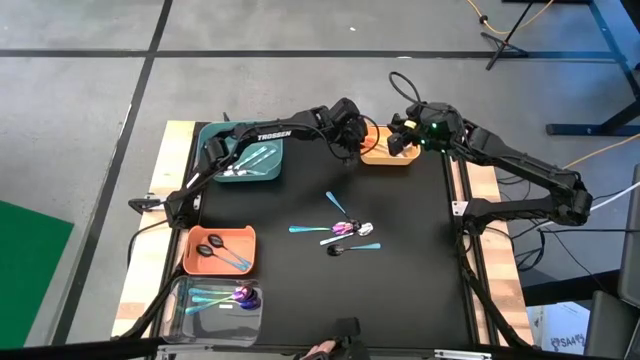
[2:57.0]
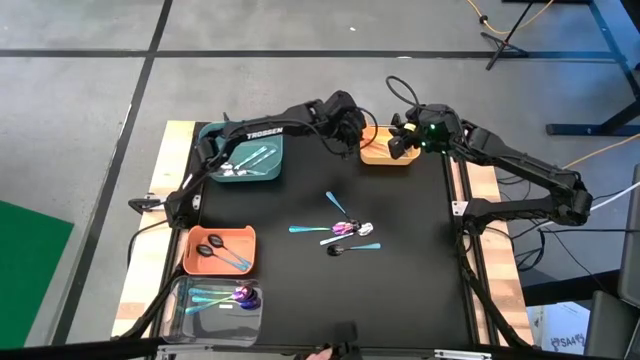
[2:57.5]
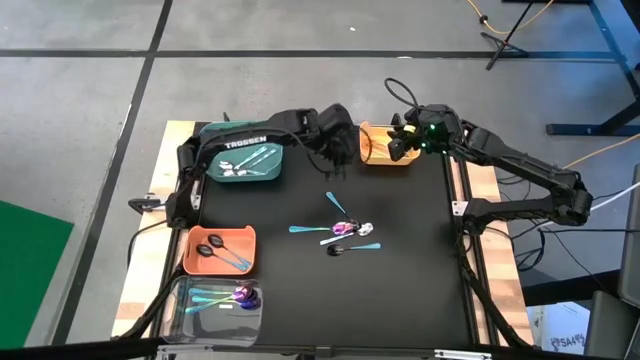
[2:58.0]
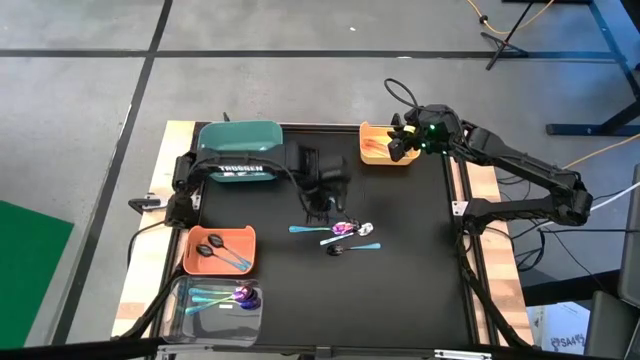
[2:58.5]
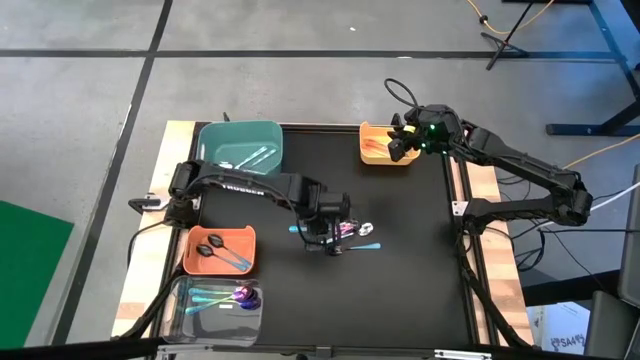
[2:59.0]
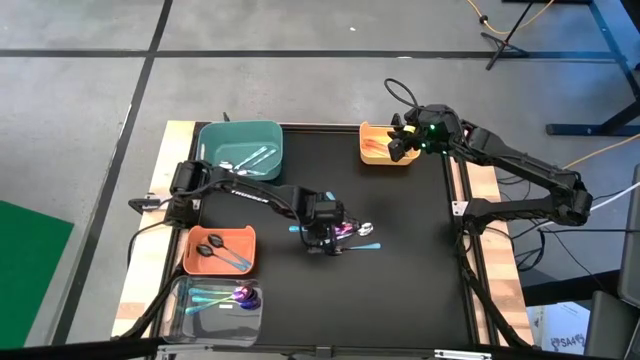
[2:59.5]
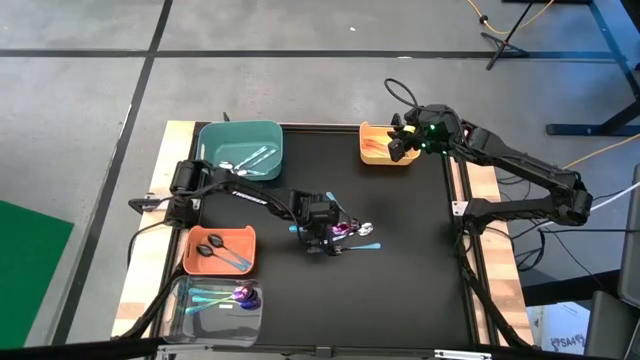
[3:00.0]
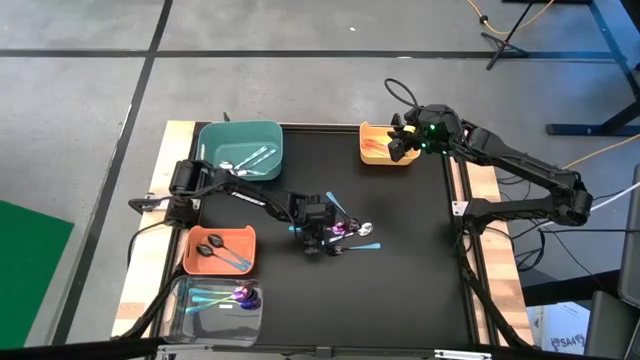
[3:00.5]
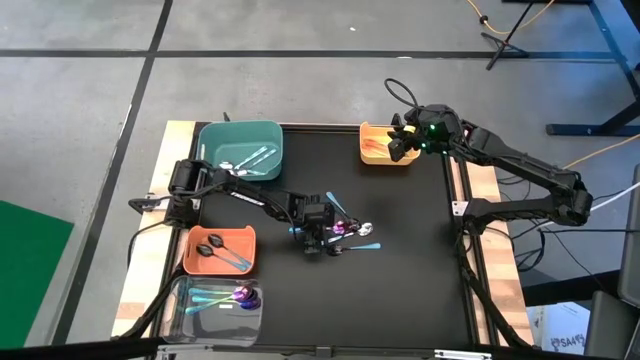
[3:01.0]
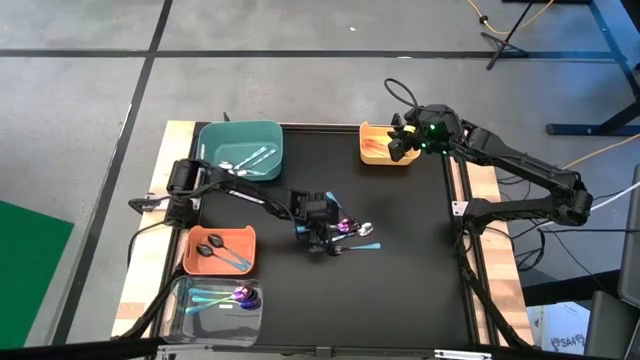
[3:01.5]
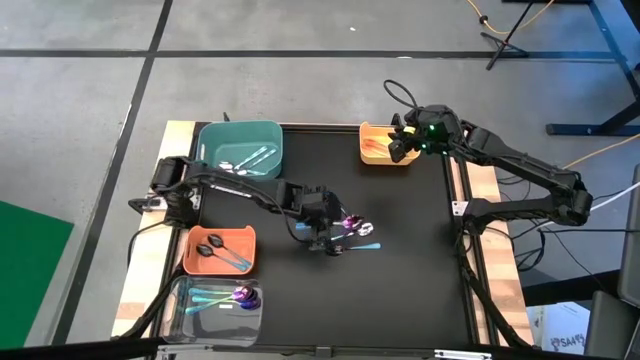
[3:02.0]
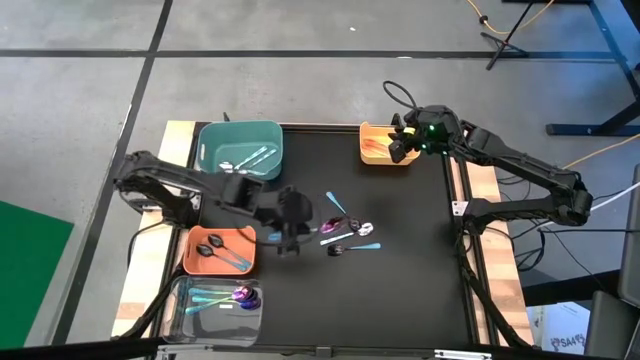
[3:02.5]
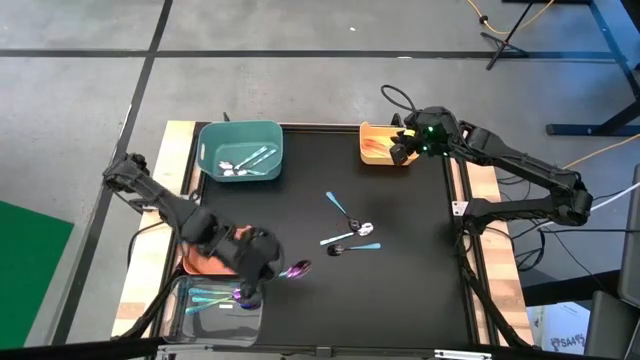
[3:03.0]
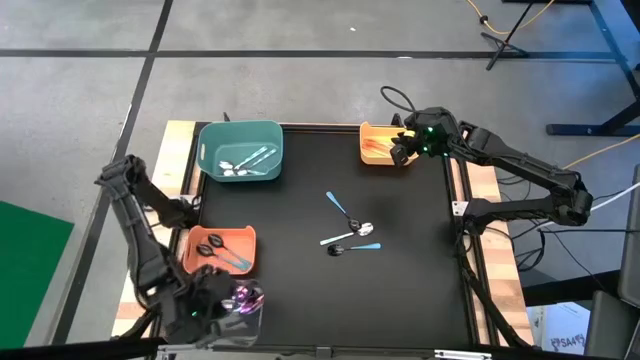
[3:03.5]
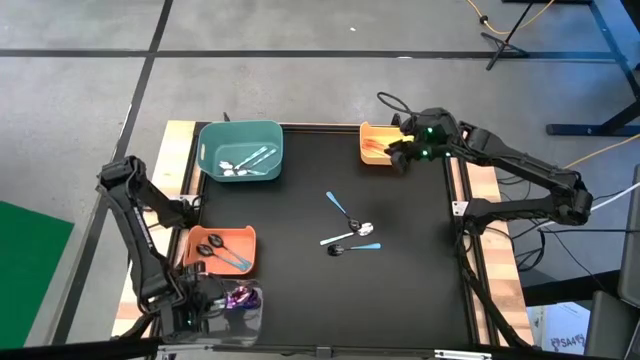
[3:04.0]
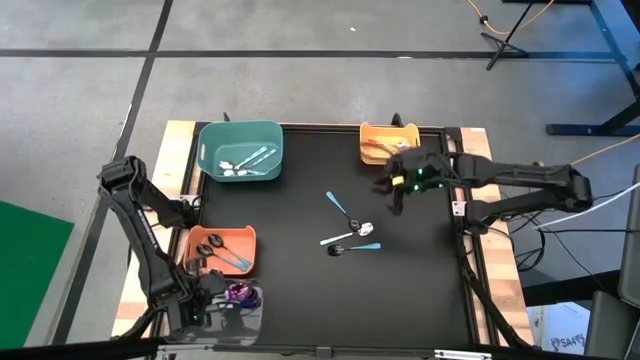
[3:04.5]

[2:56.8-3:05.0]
Task: Sort silverware by color (type)
Put the violet spoon into the transparent bin

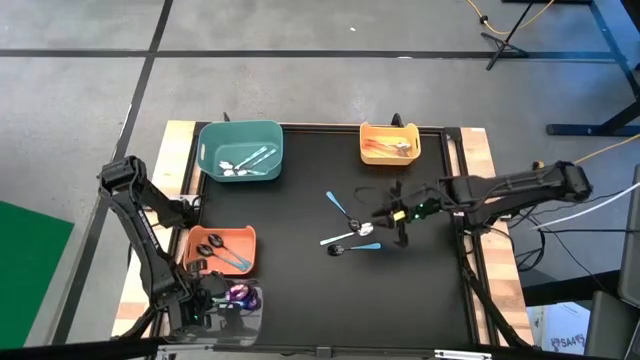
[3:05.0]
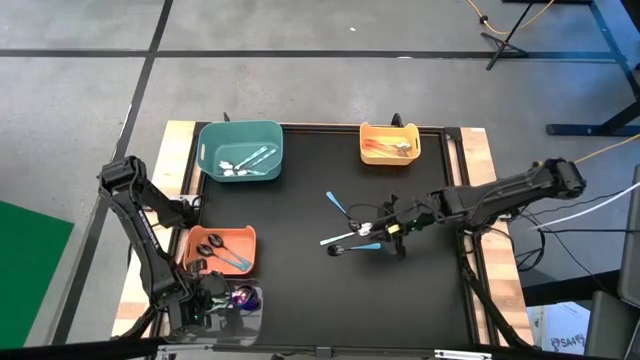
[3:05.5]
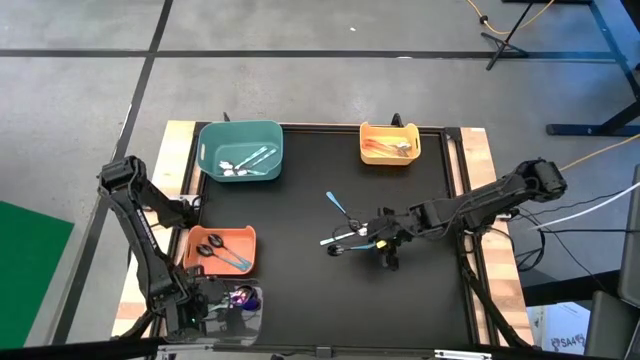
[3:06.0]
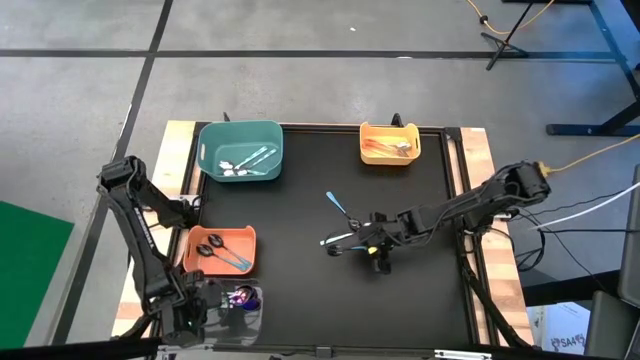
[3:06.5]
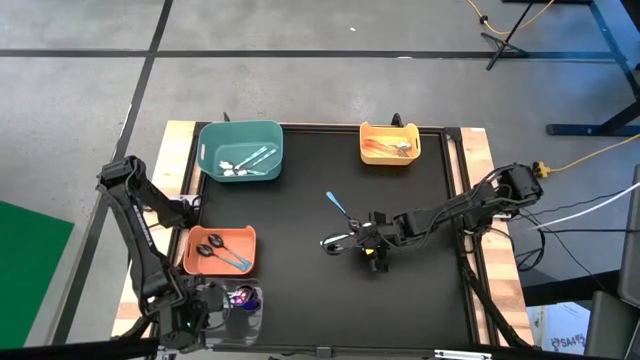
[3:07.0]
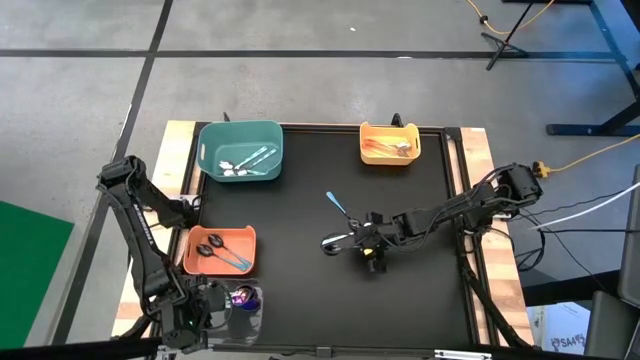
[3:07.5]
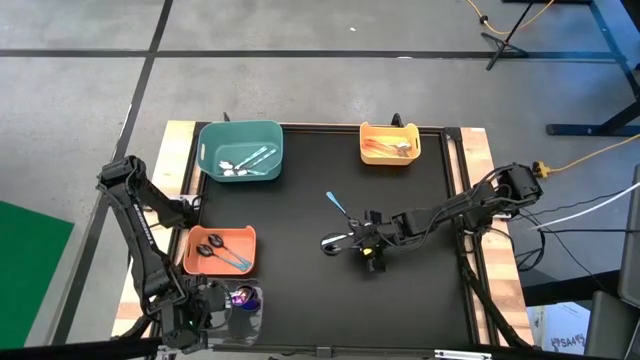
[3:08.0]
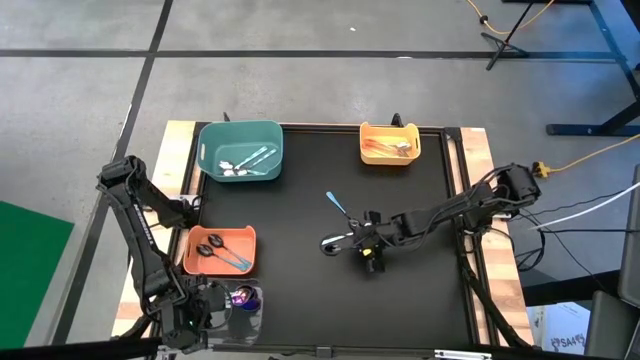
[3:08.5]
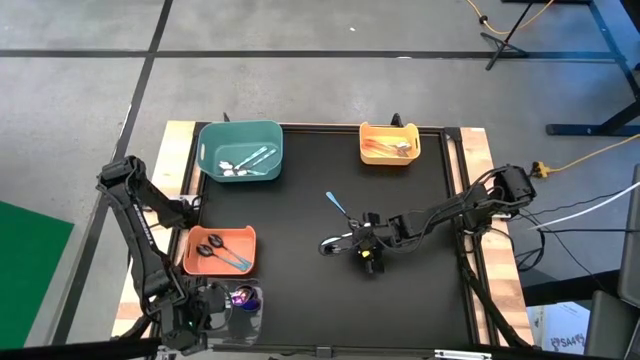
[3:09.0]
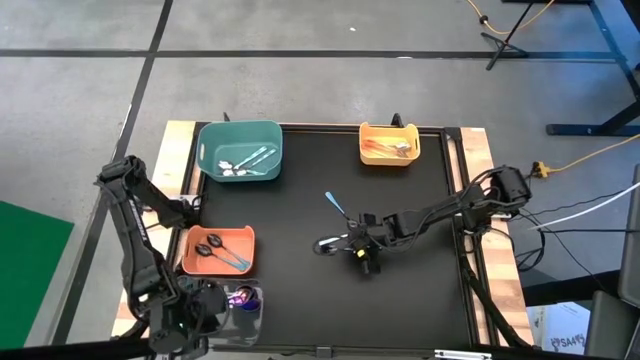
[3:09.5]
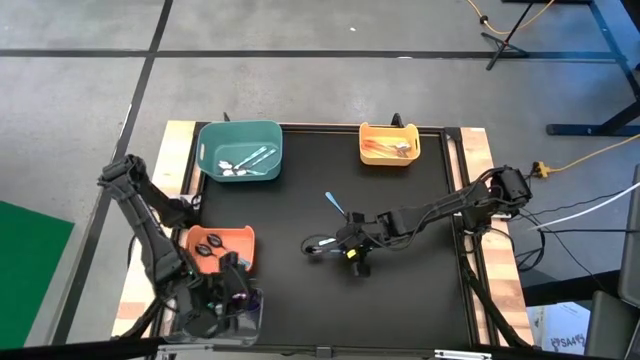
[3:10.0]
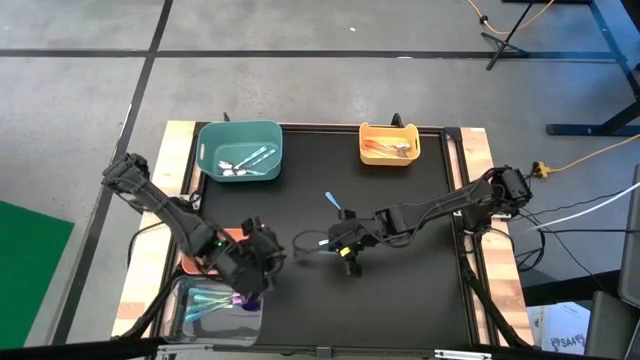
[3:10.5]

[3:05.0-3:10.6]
Put the light blue spoon into the orange bin

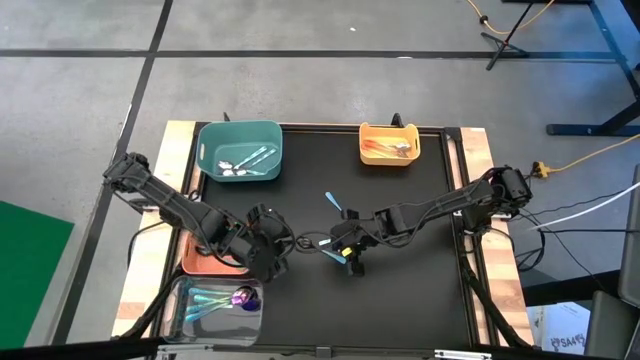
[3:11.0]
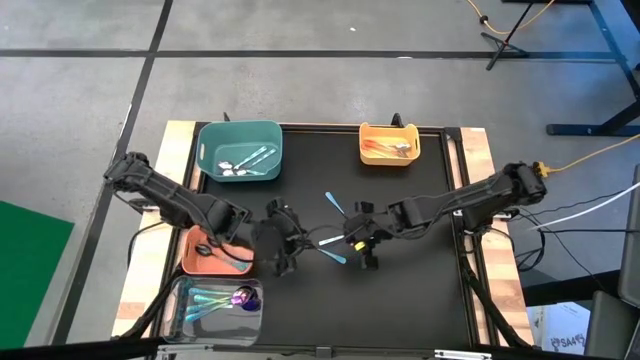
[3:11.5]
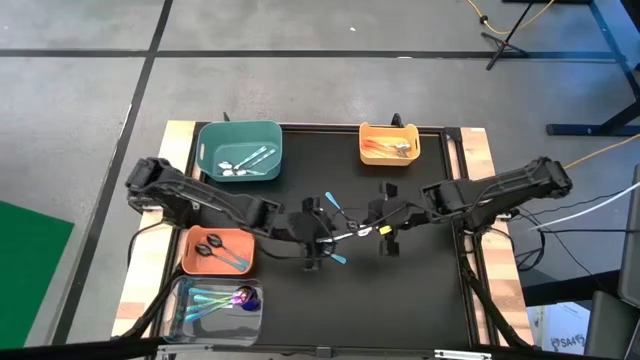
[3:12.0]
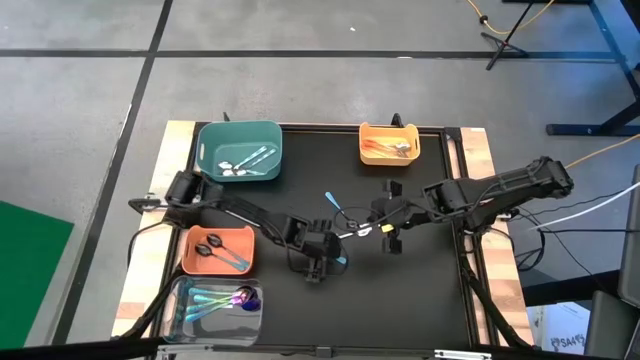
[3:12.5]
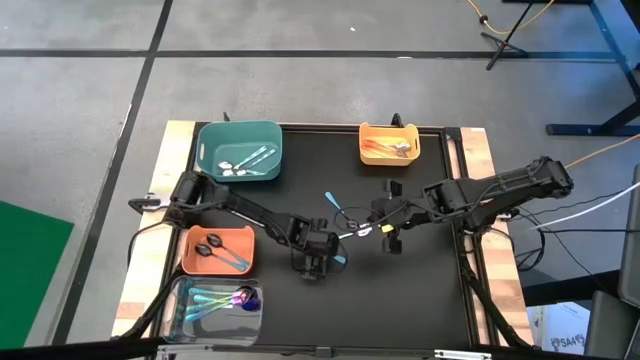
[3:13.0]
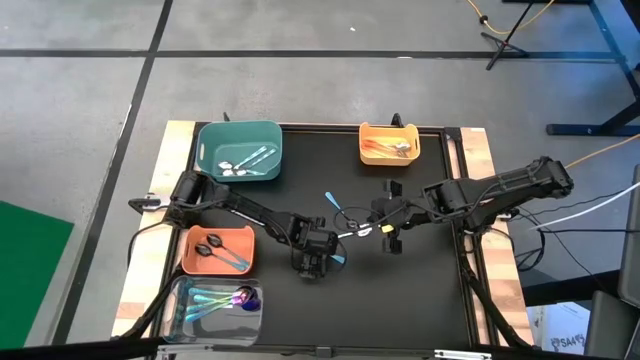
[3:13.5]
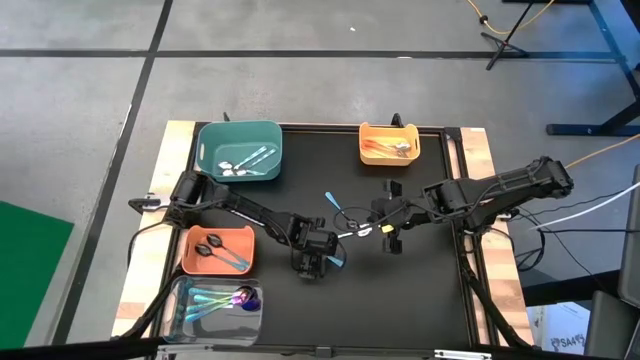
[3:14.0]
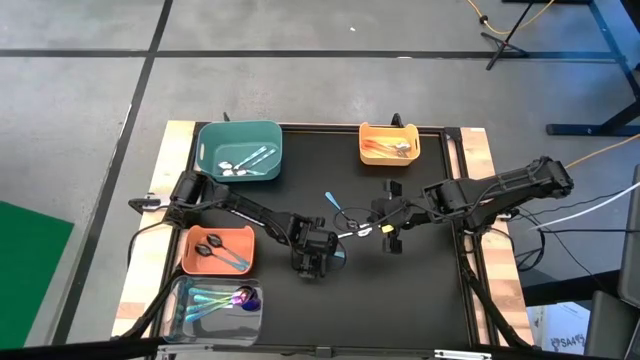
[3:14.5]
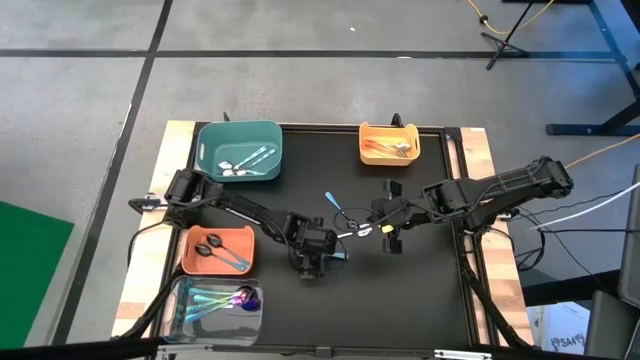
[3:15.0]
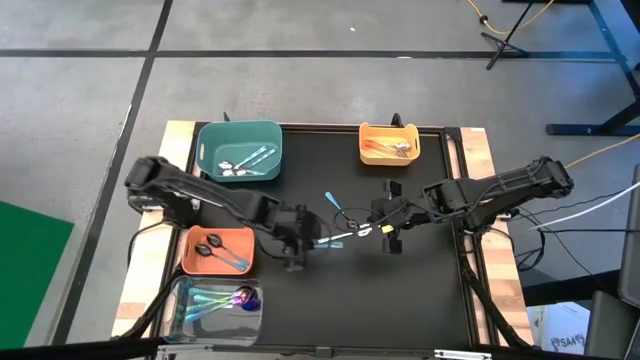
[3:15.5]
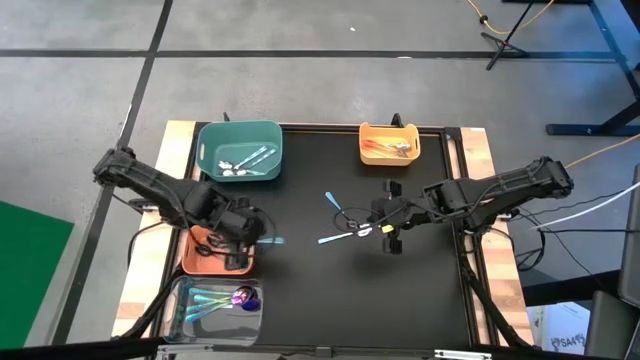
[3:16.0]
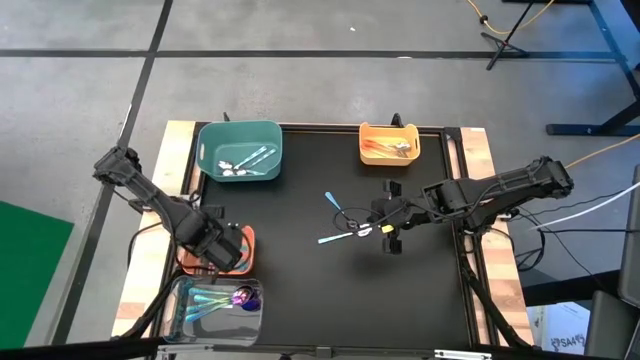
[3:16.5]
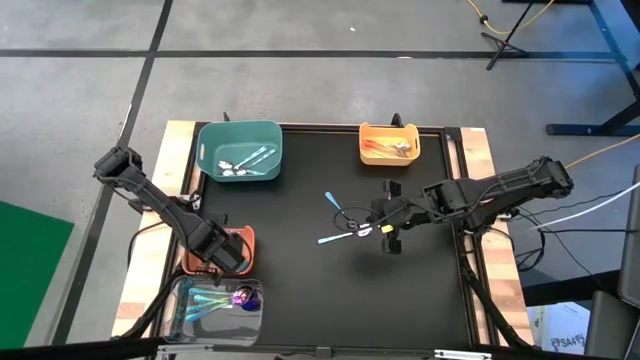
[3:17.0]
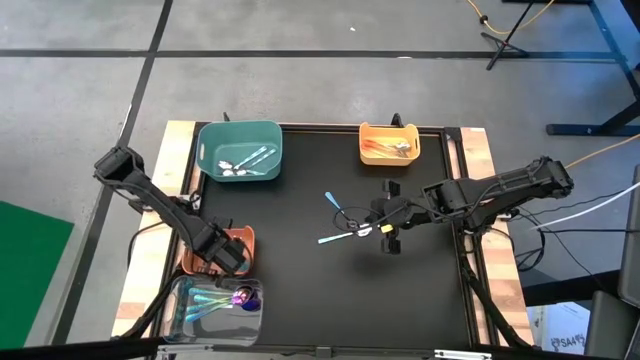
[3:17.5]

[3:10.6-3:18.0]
Put light the blue spoon into the orange bin
